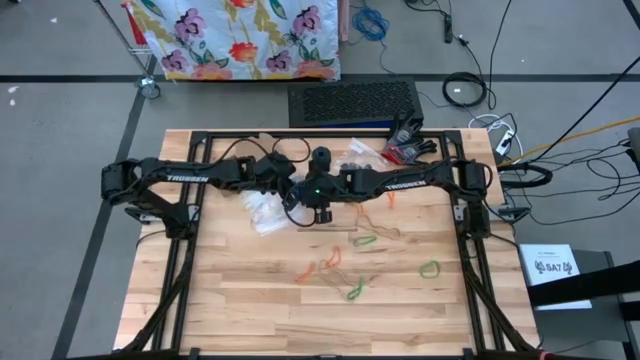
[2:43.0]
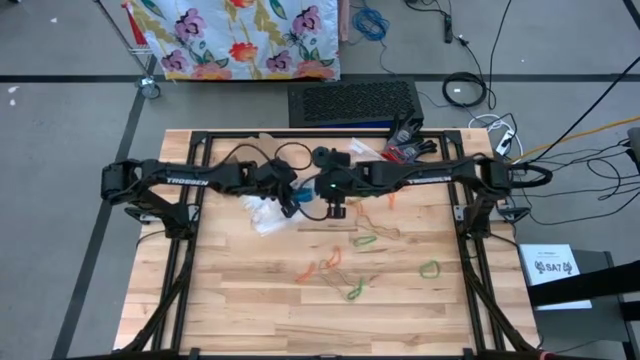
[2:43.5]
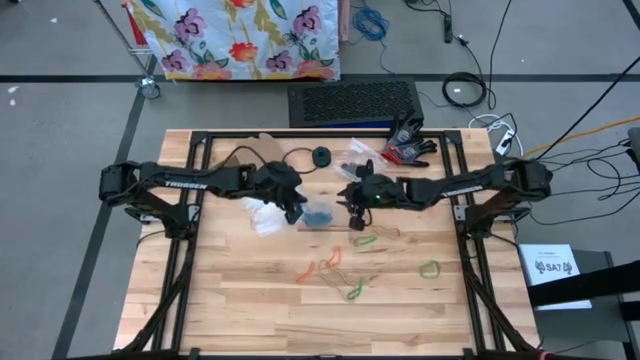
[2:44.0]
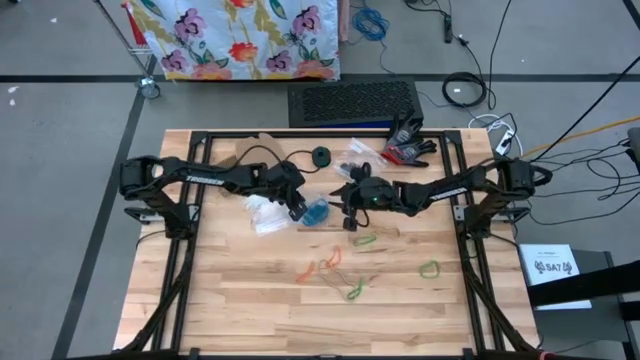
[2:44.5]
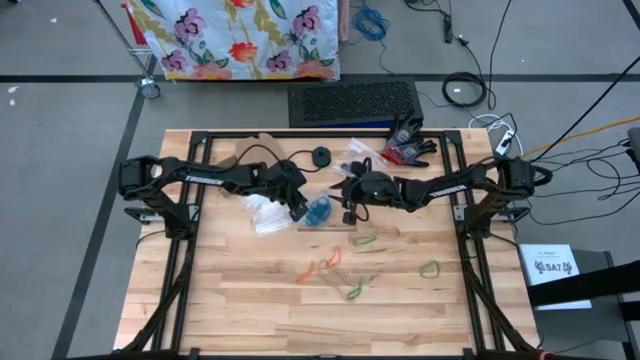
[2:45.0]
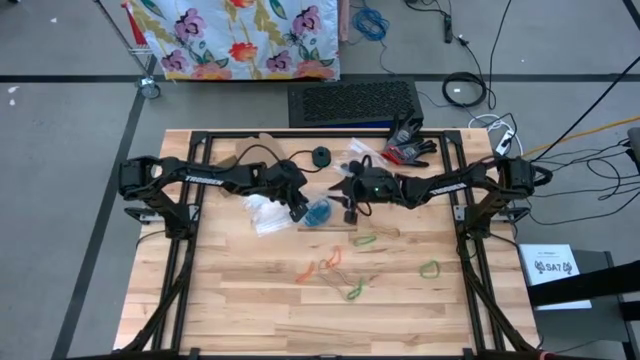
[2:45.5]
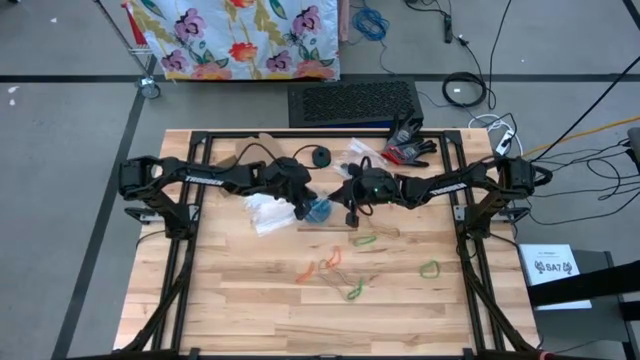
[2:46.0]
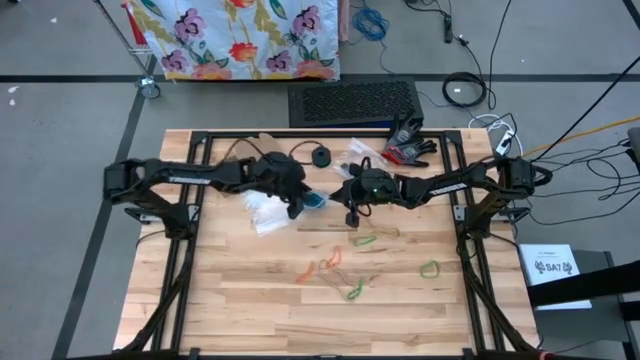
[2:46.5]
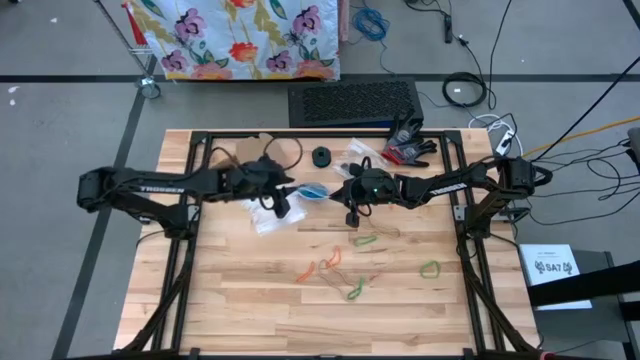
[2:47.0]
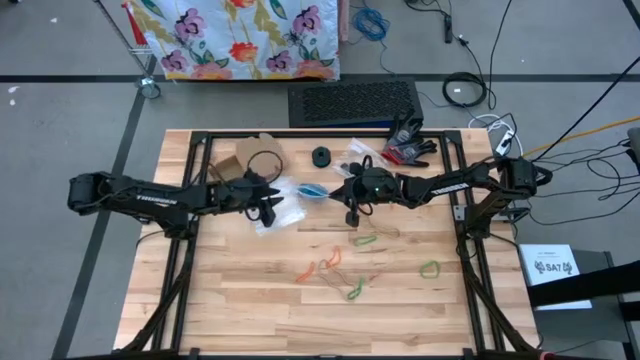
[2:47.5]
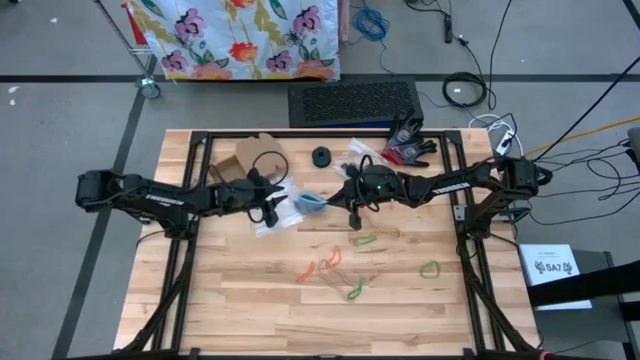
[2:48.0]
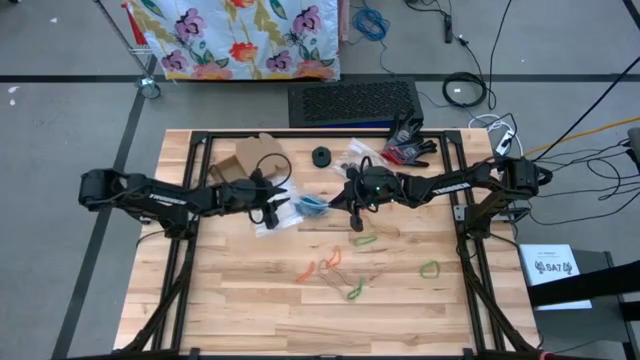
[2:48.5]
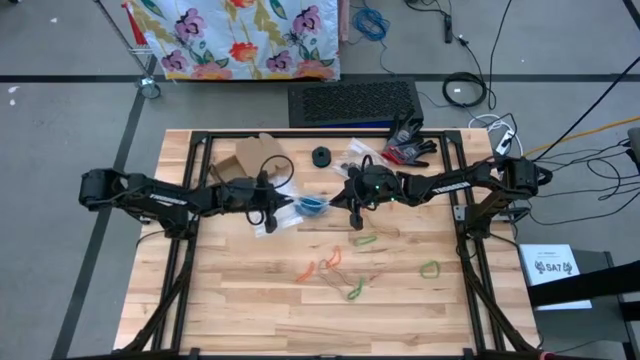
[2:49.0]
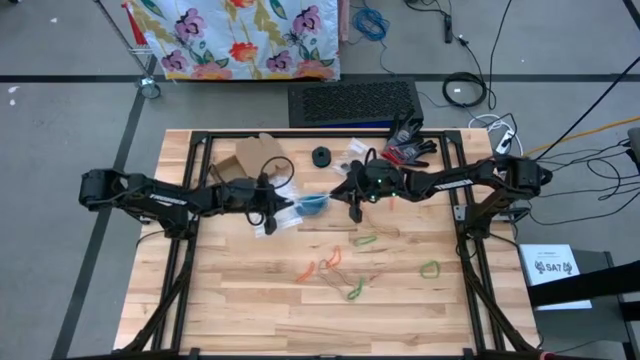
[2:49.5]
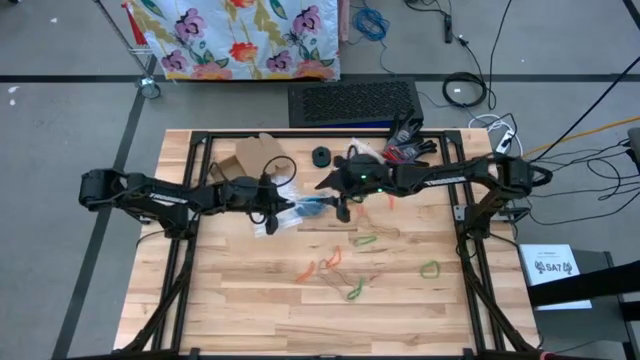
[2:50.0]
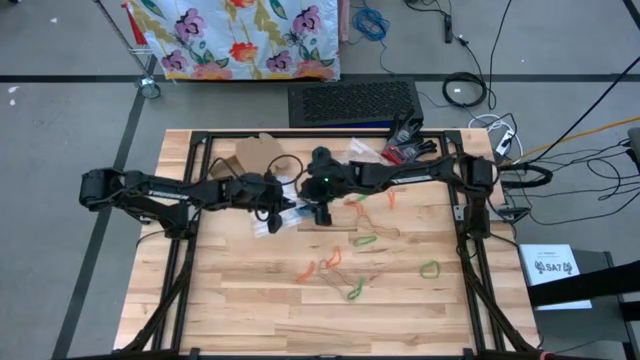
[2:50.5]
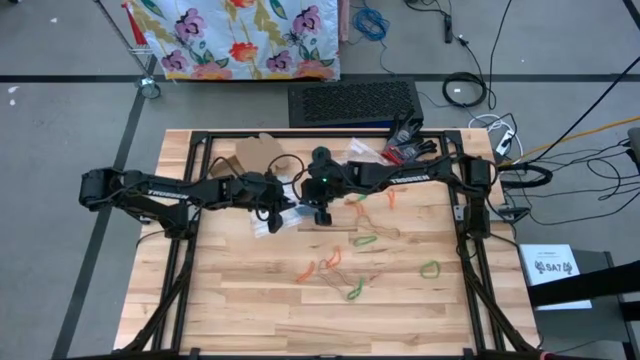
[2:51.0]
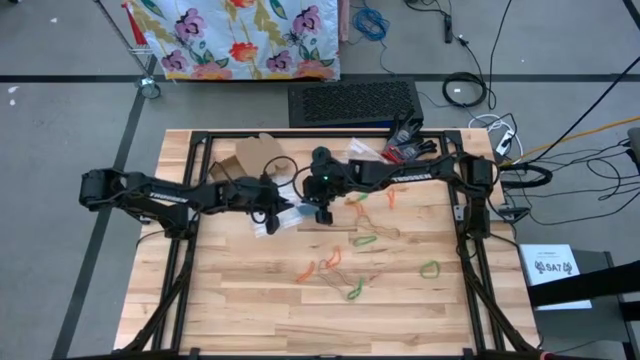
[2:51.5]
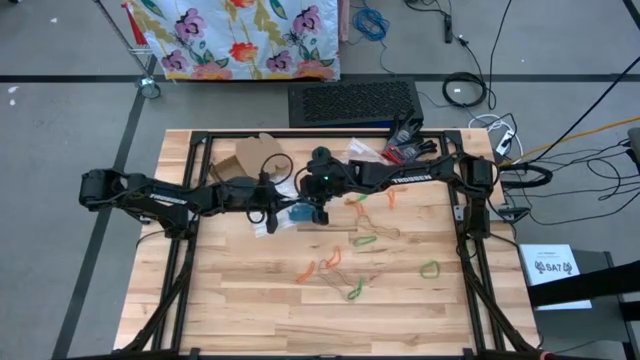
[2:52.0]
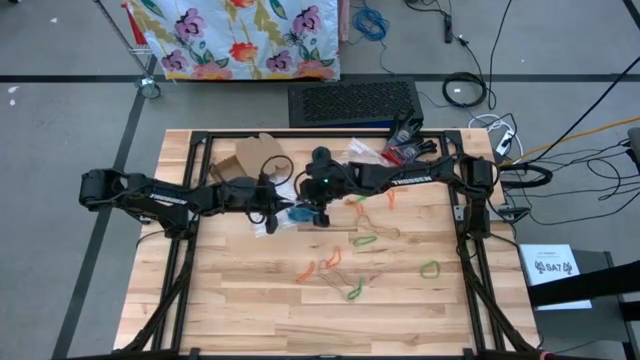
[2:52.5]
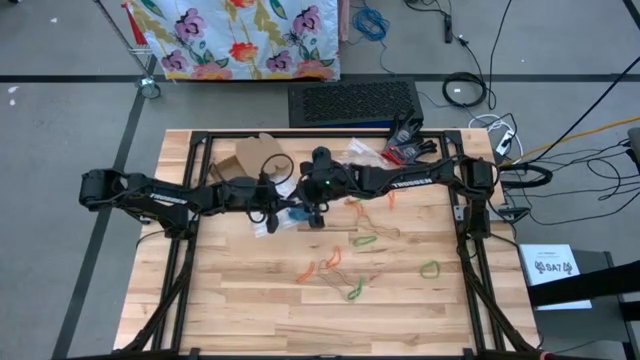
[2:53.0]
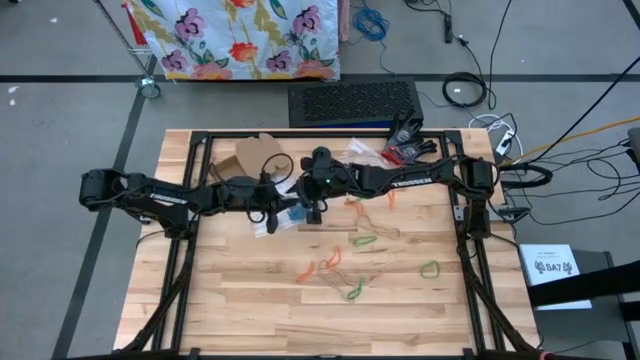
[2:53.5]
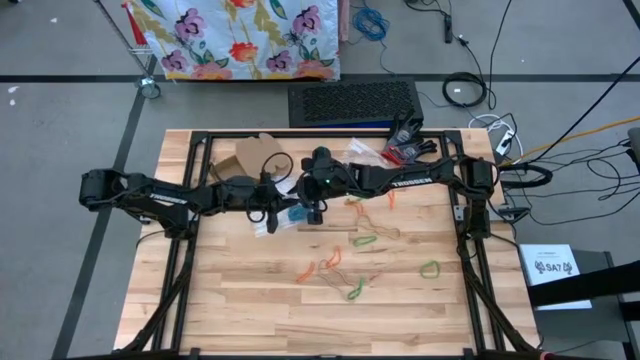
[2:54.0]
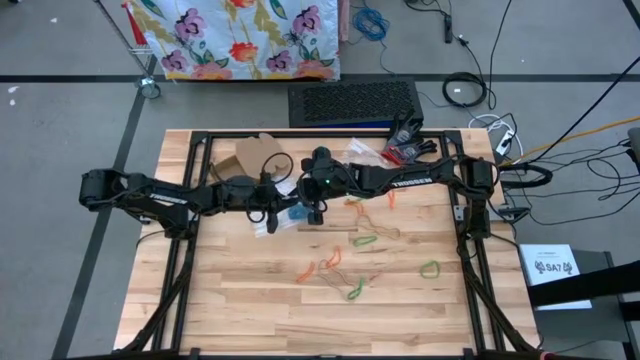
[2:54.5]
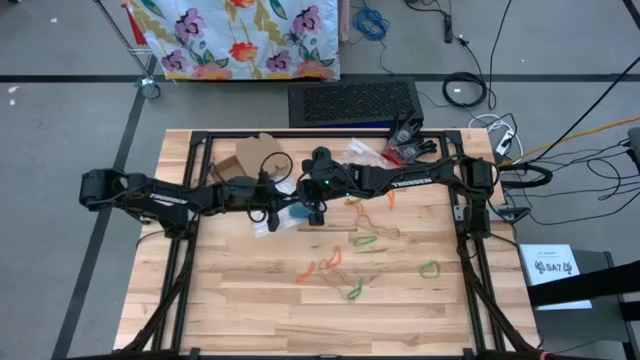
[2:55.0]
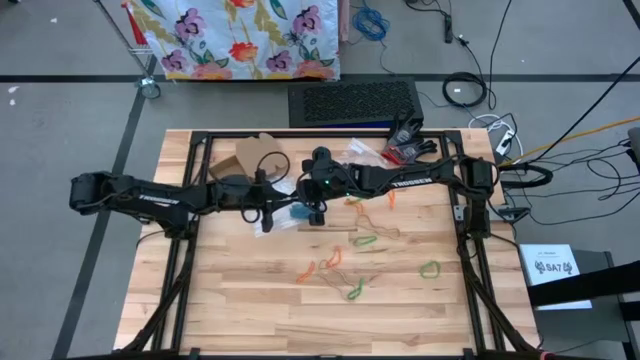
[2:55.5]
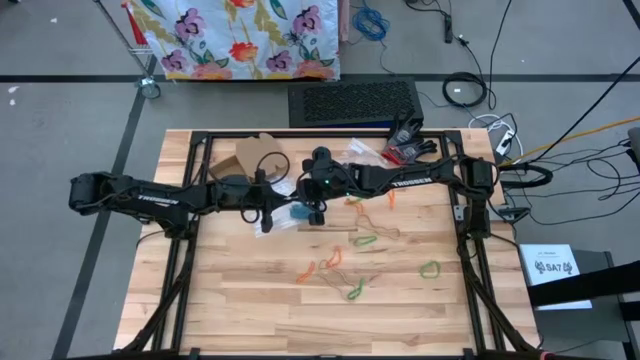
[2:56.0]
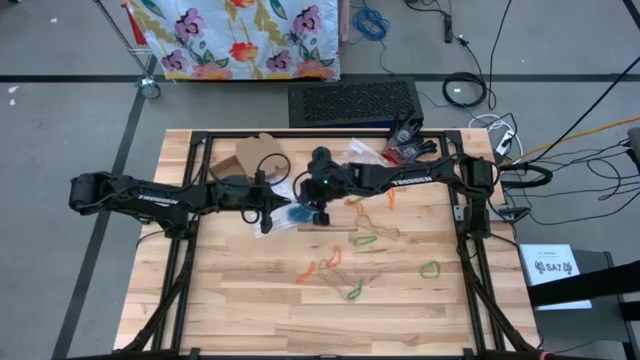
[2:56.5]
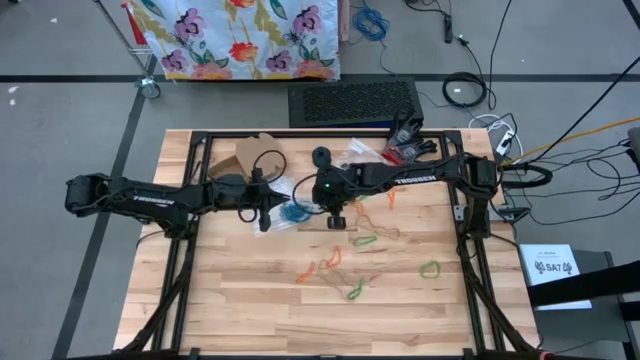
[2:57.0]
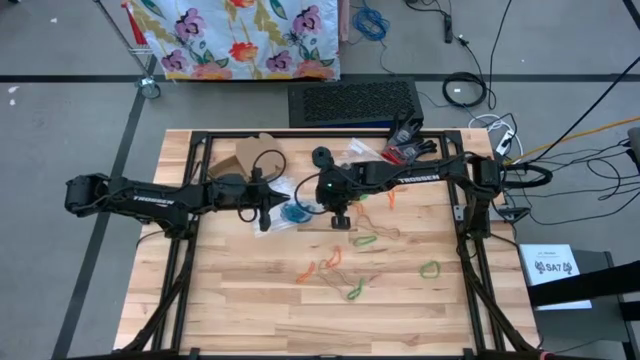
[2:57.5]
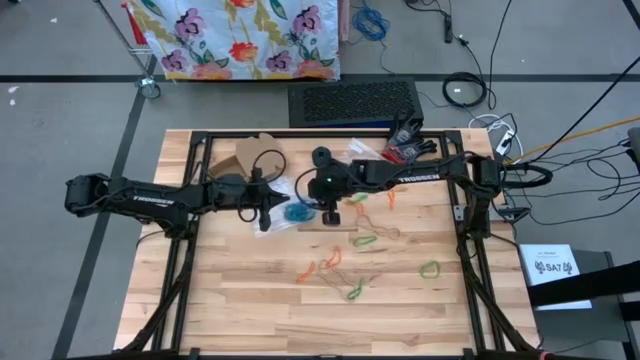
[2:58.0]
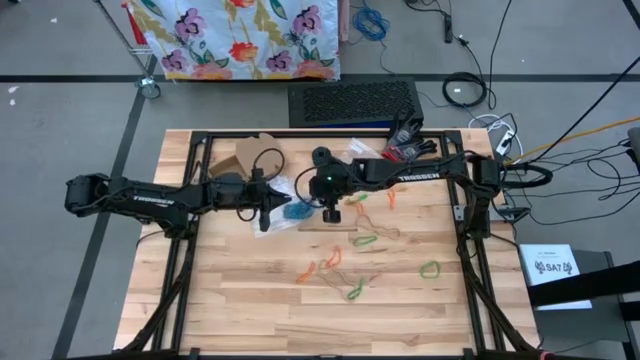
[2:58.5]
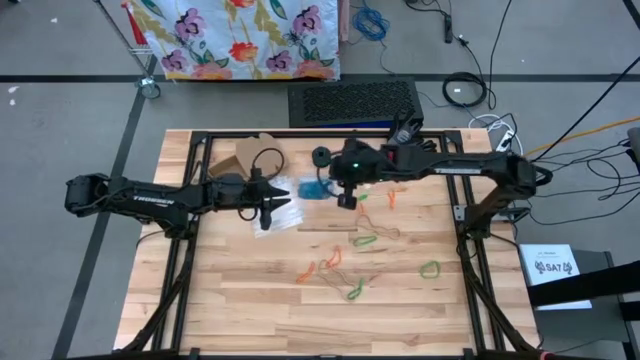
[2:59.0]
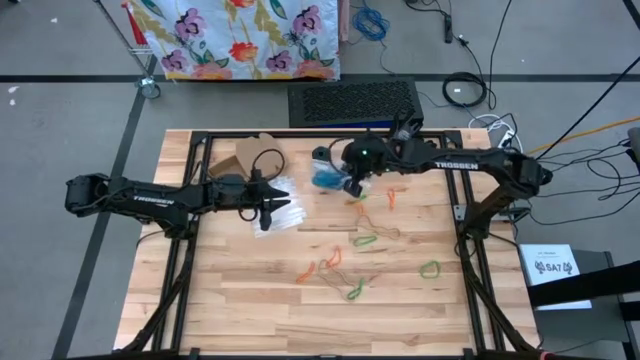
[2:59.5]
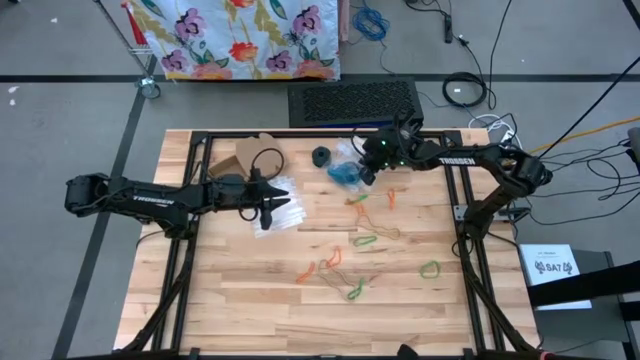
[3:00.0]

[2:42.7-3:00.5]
Task: Sort rubber bands
Close the transparent zip bag

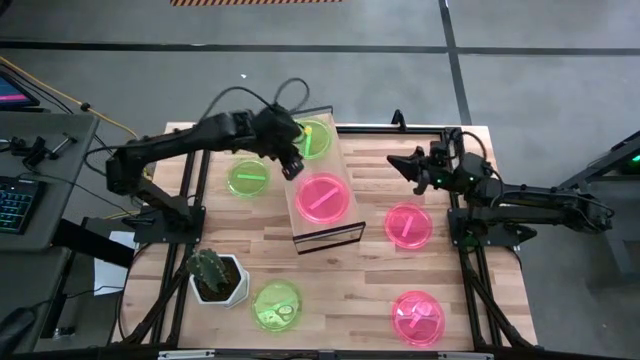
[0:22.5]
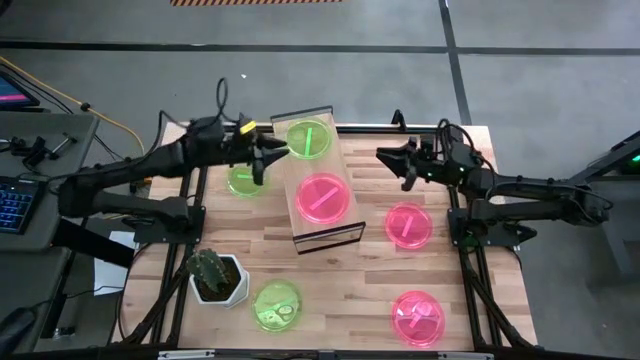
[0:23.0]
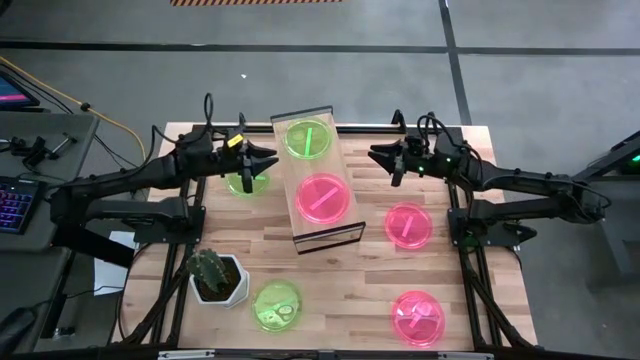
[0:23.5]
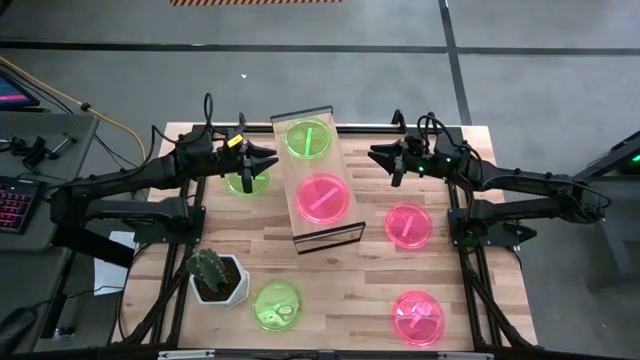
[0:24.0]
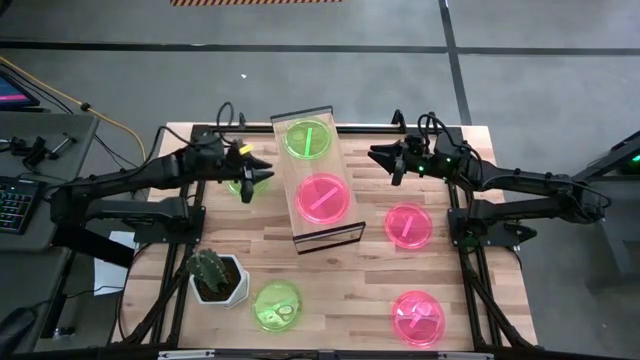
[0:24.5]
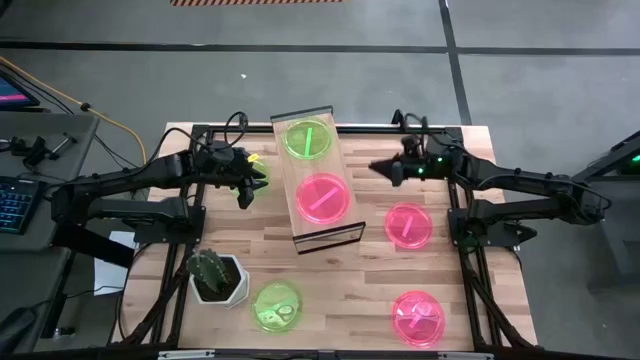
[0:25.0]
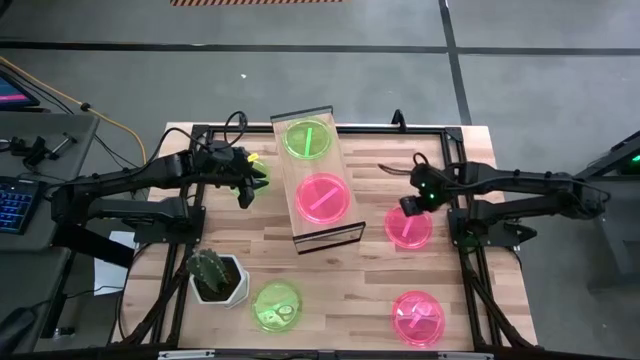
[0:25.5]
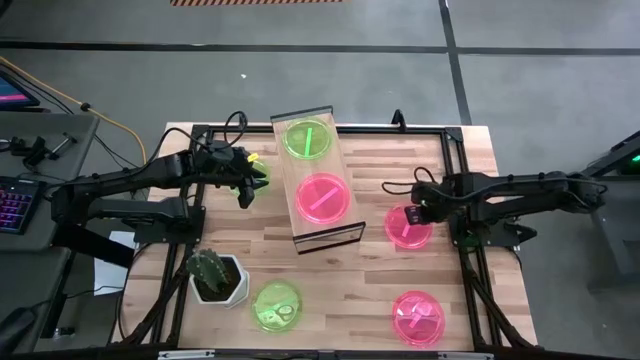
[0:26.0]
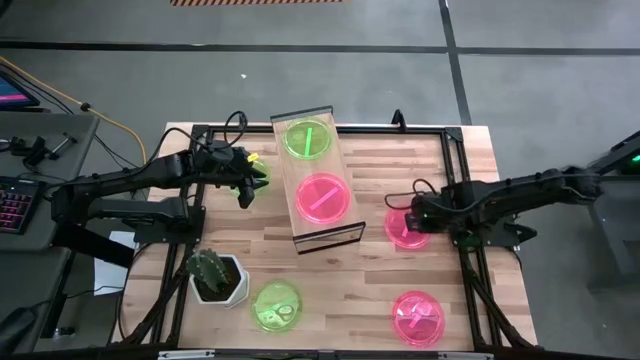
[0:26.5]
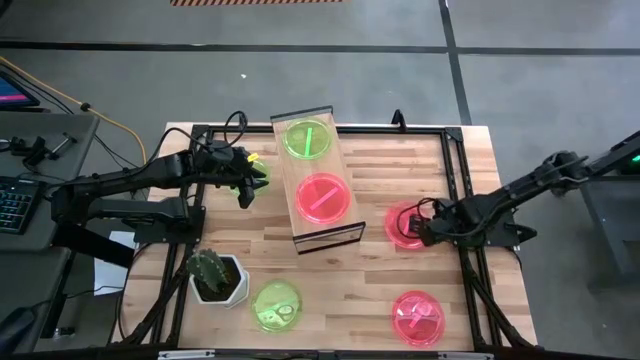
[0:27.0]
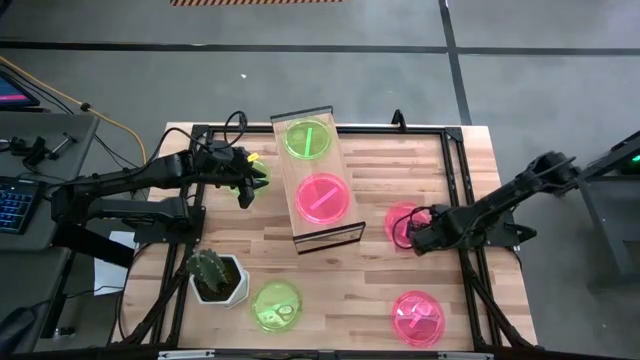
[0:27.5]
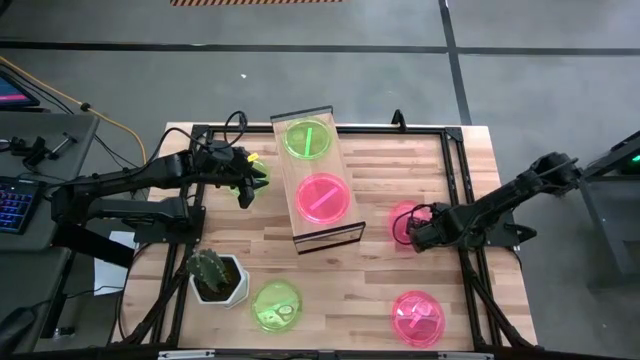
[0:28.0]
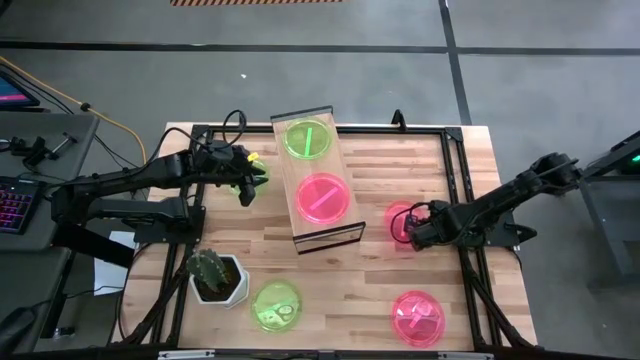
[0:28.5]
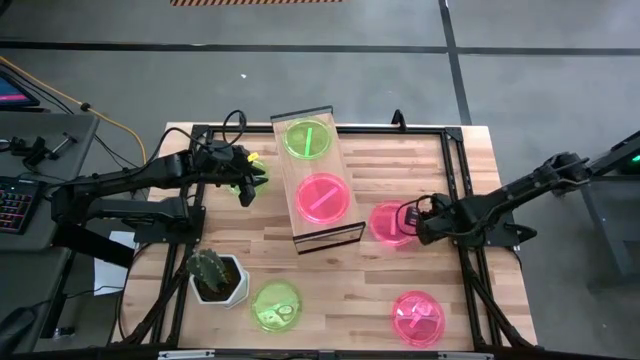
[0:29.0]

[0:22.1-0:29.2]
Task: Place and stack plates onto a shelf
Stack the top light red plate on top of the light red plate on the shelf
